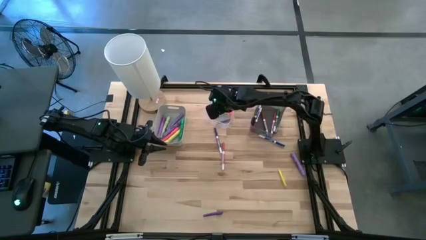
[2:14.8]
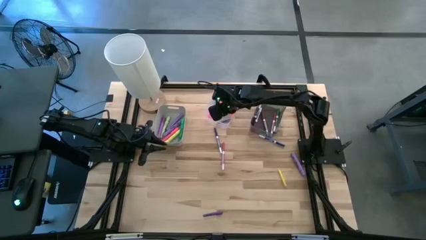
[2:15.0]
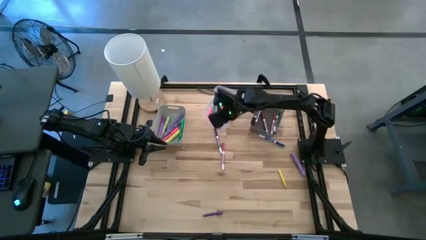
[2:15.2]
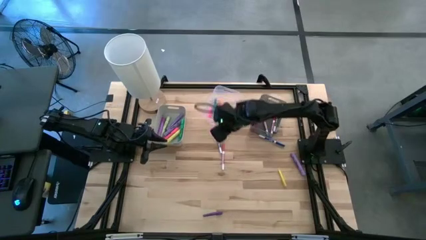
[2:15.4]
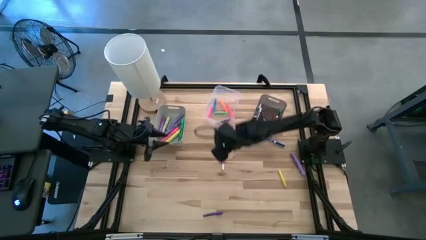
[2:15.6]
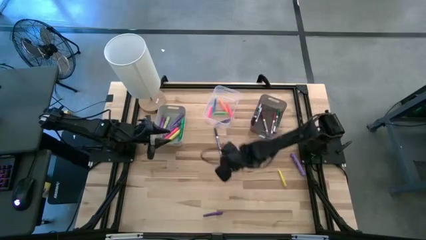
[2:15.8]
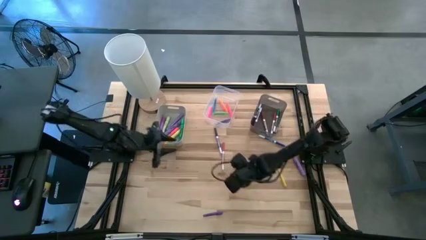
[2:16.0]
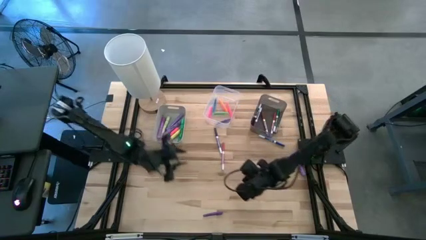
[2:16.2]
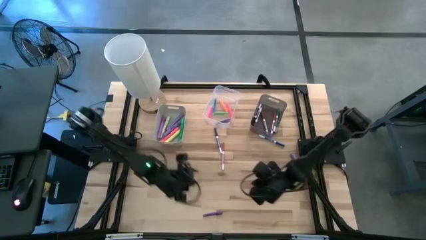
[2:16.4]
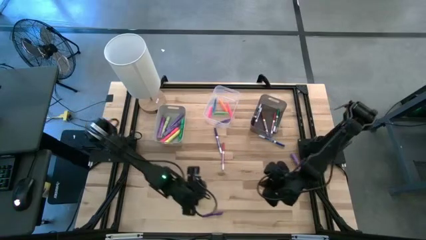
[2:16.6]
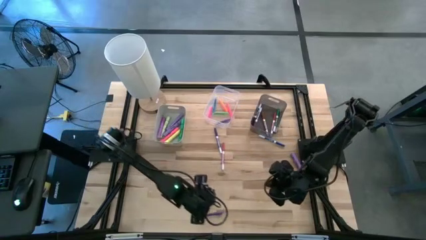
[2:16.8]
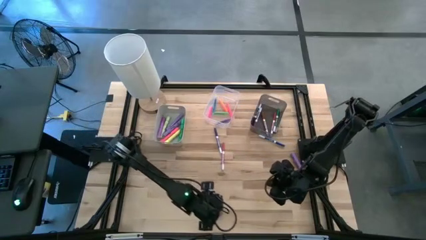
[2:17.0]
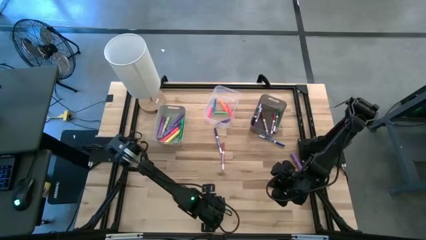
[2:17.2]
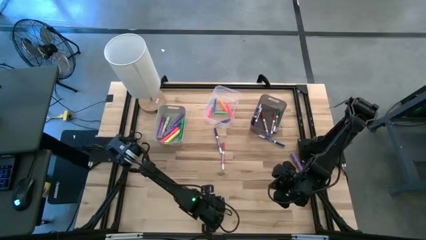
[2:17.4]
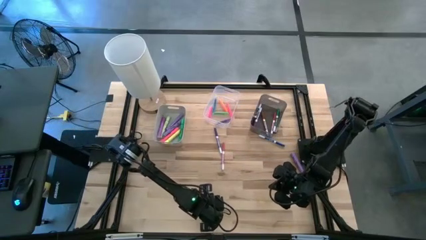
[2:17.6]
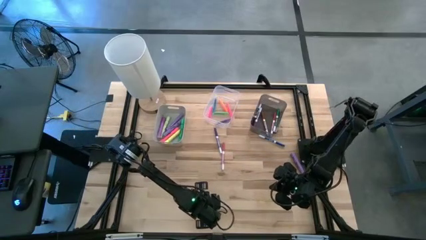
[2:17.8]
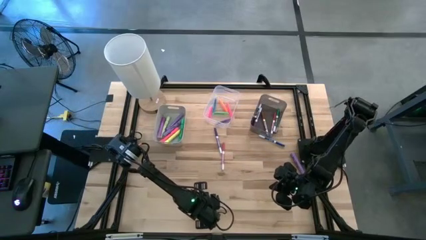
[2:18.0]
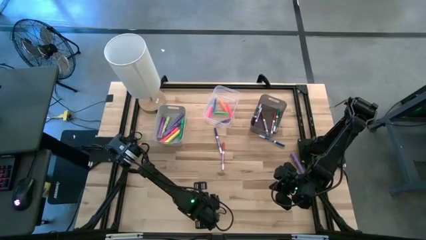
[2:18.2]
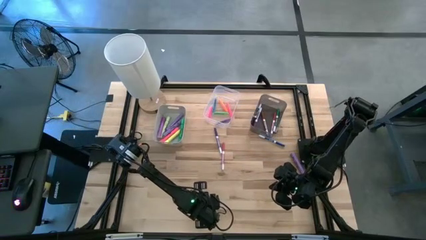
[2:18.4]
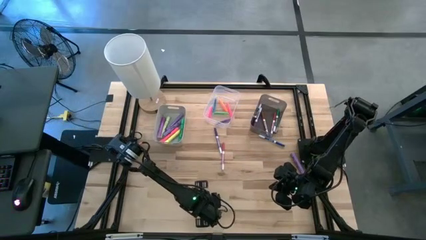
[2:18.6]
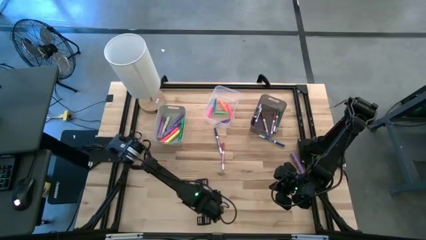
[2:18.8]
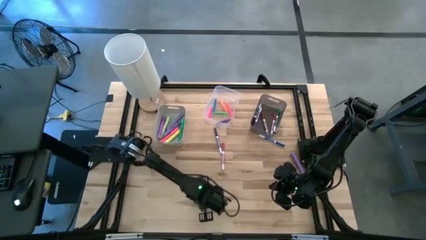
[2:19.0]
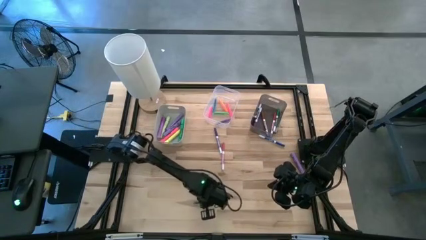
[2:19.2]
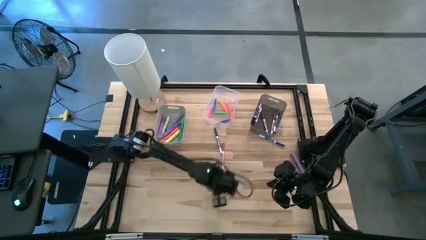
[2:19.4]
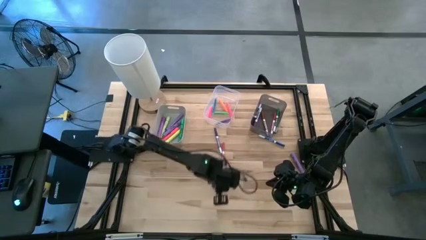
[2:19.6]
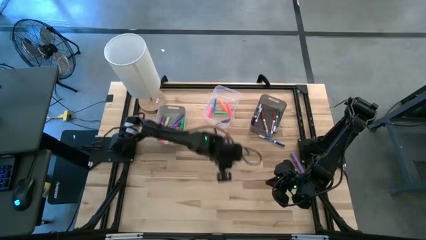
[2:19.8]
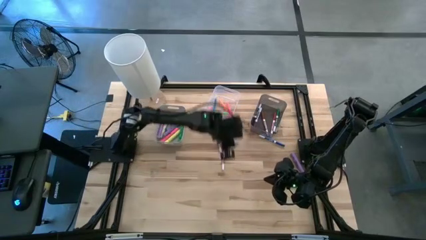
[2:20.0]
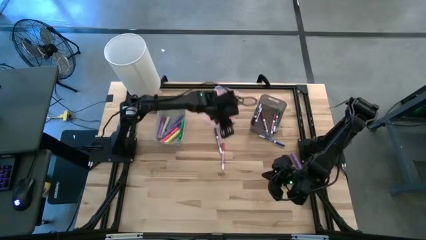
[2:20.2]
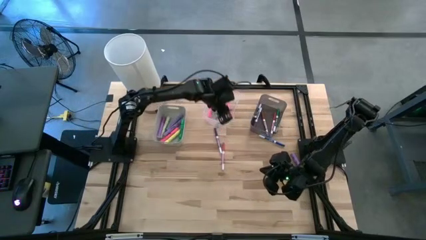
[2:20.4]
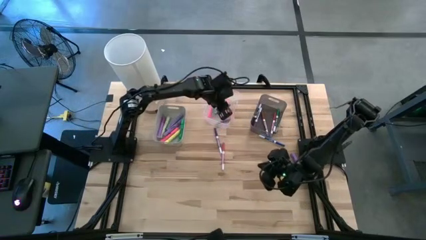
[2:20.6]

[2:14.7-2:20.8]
Task: Pick & Place Markers
Put the blue pen into the transparent bin

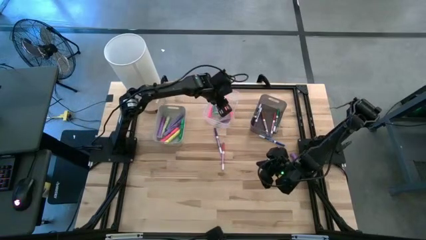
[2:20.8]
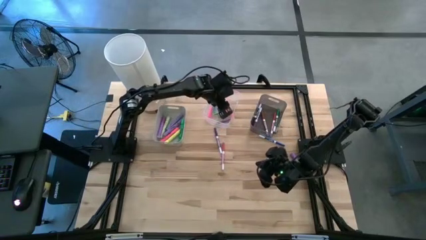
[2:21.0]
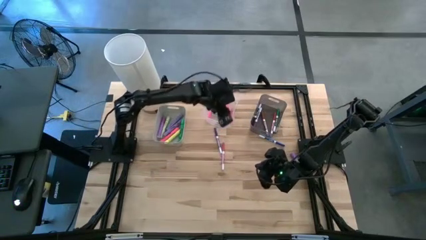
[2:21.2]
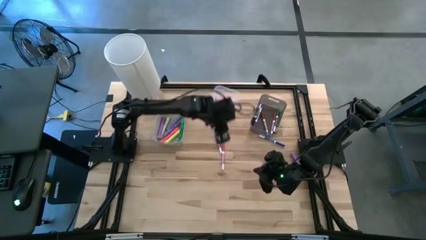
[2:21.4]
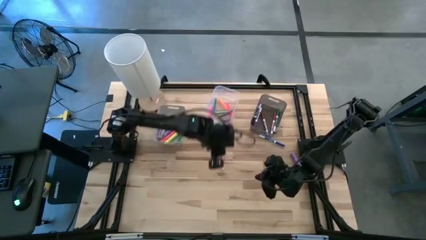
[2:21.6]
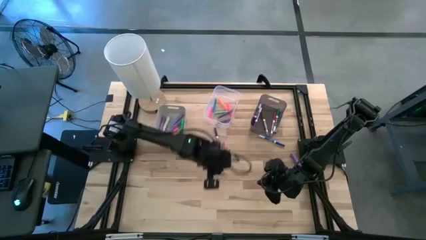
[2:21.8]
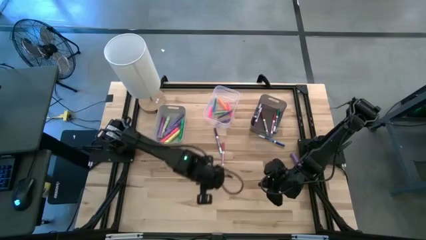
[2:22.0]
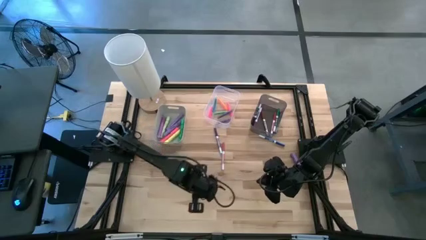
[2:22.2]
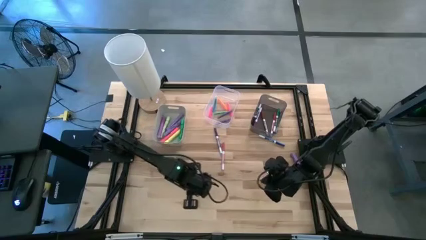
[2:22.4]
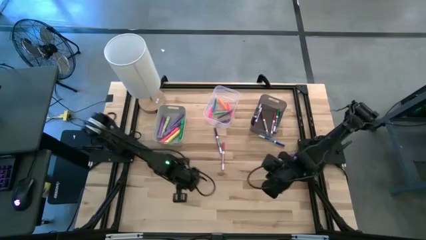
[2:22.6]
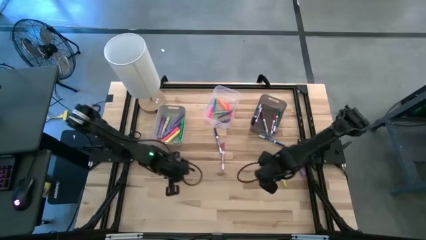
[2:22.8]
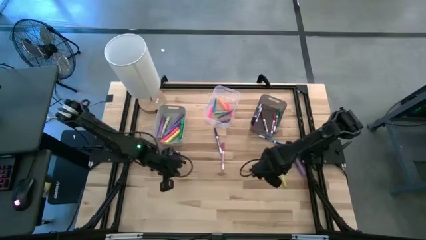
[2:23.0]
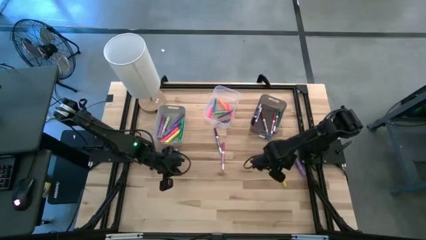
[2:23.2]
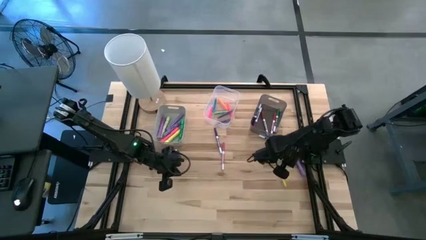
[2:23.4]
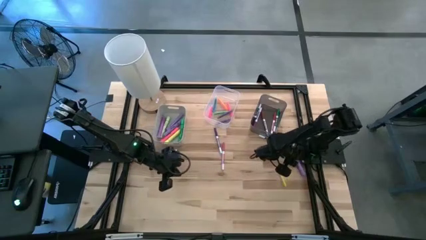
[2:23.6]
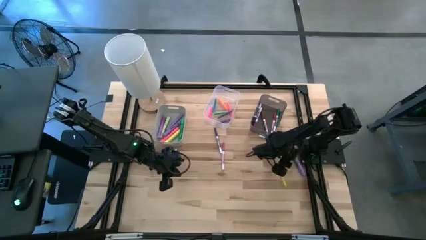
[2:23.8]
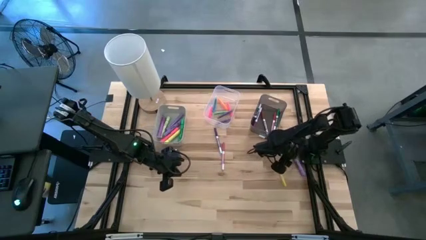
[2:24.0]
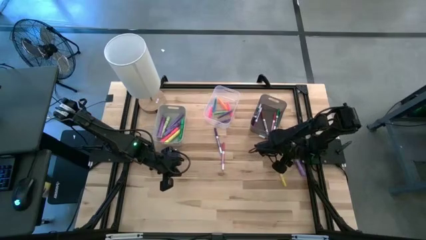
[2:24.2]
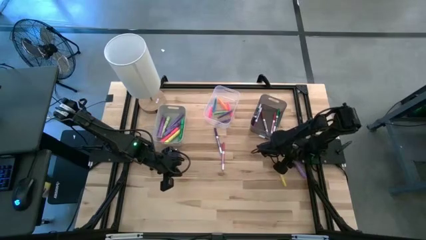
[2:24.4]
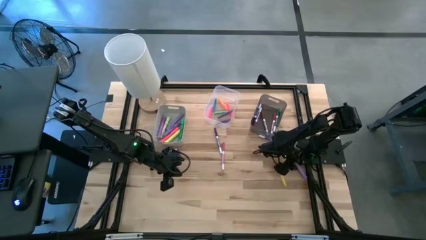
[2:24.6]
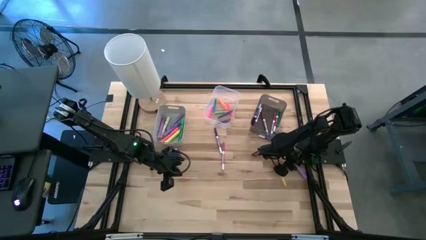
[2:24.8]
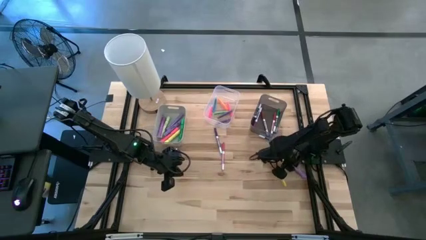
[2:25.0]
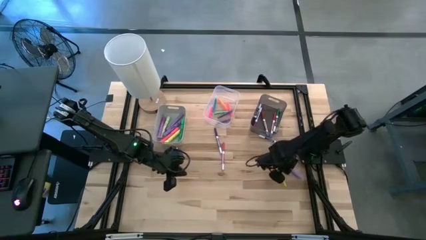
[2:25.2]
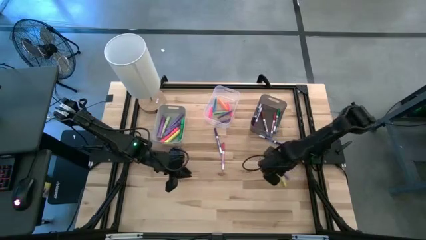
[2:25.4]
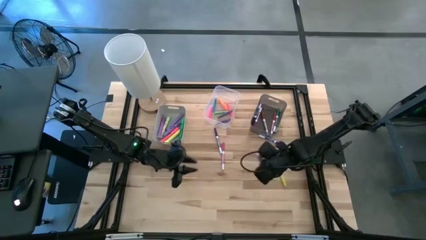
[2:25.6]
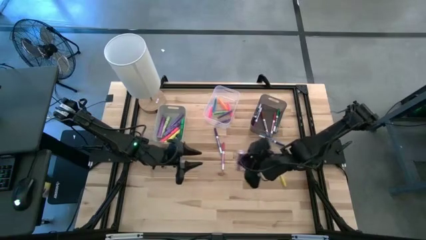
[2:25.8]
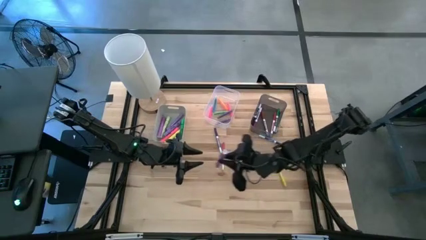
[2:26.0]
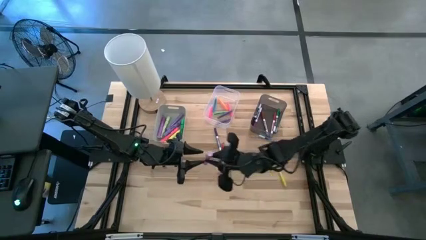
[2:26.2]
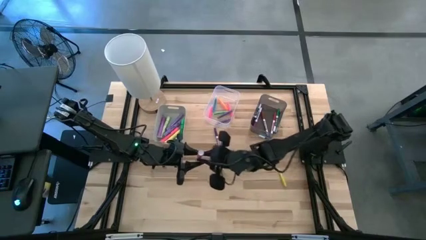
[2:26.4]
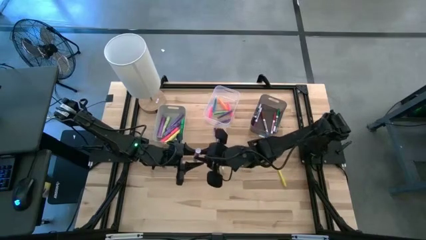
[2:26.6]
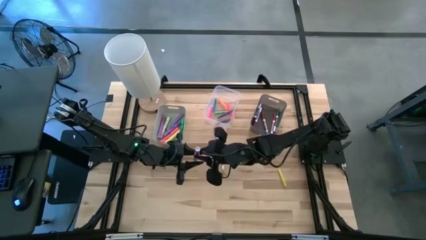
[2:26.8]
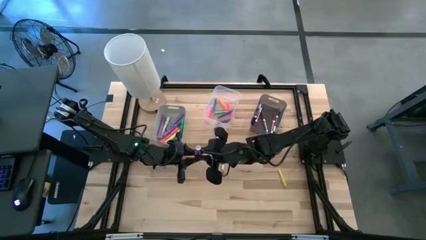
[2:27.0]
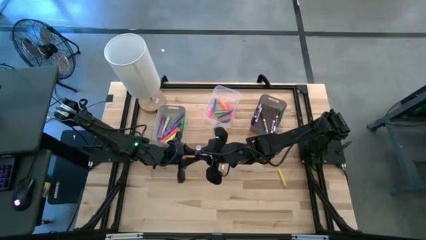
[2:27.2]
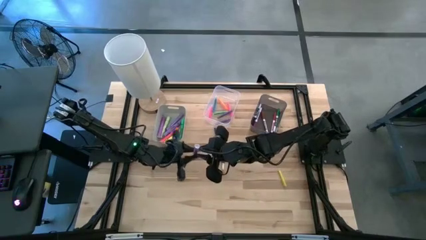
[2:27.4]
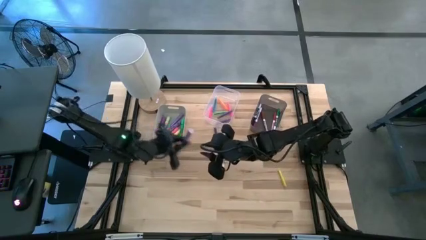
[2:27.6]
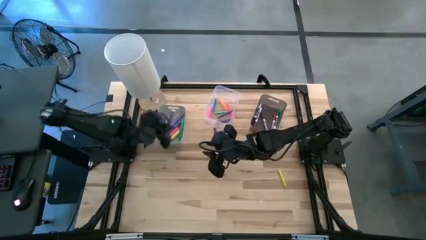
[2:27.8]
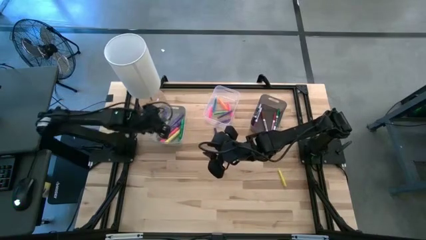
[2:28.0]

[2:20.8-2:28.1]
Put the purple highlighter into the gray bin

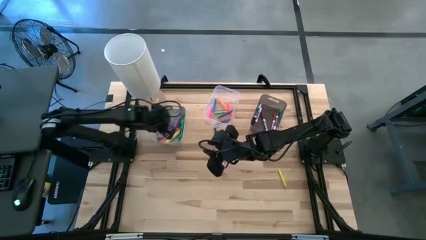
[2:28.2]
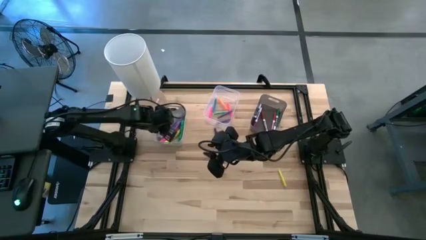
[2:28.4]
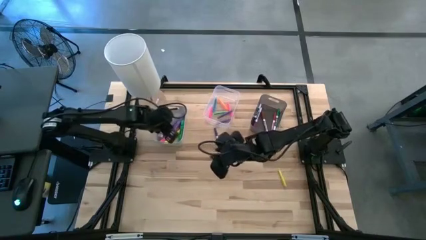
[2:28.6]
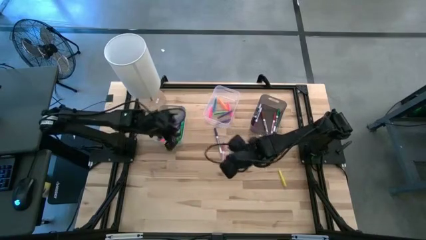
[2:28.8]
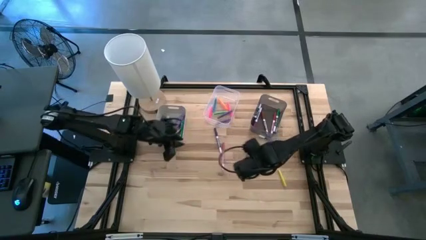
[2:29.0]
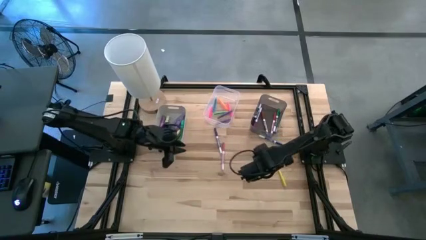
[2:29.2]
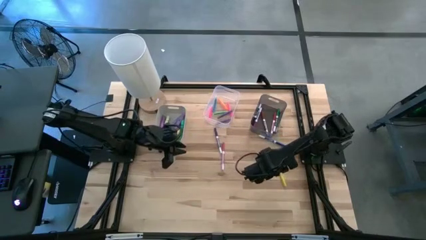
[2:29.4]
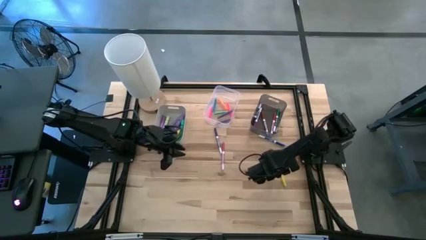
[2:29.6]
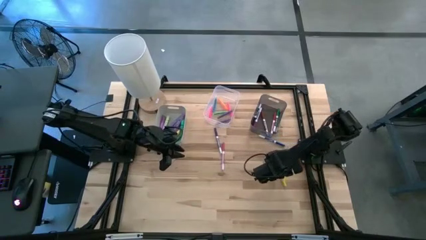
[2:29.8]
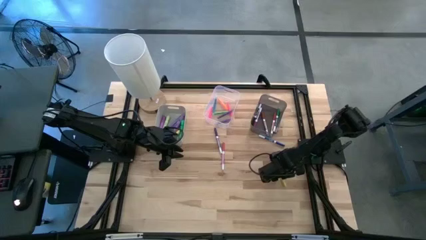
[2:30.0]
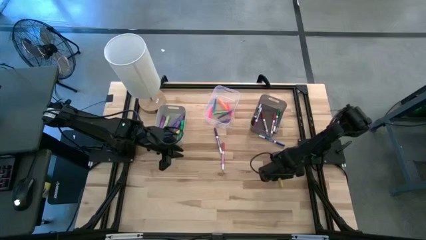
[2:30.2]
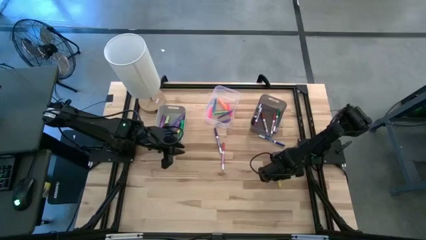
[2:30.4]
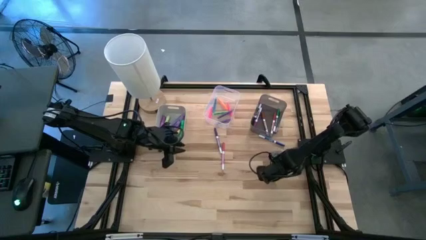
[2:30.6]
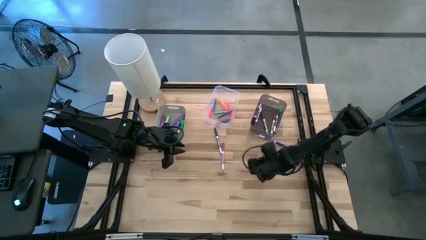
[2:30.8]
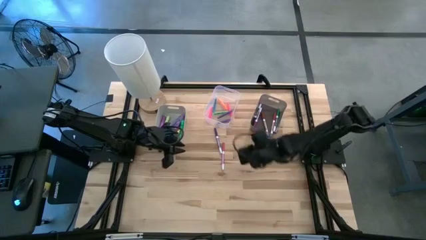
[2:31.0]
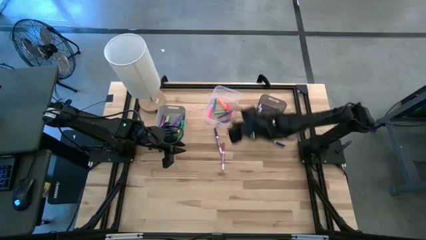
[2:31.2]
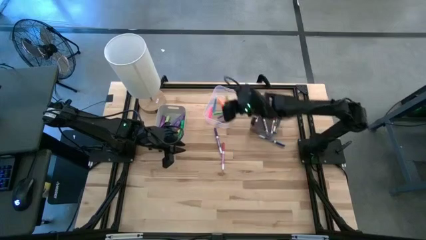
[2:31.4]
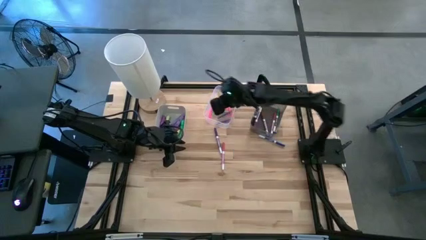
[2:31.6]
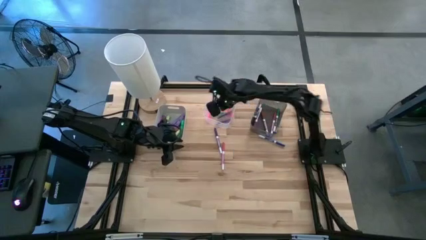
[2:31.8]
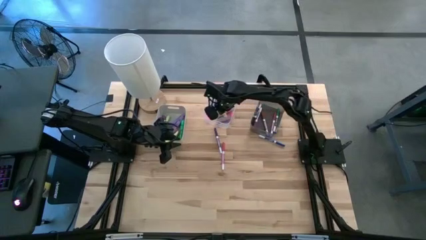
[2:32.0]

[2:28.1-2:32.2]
Put the yellow pen into the transparent bin
